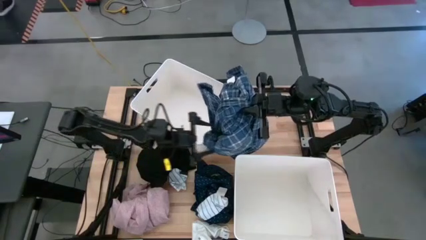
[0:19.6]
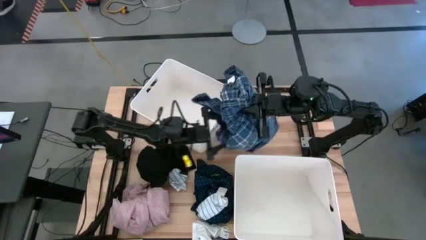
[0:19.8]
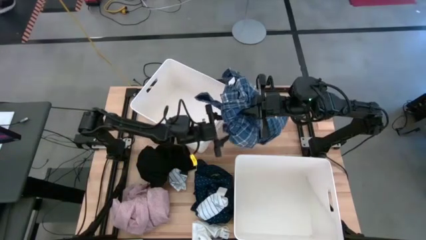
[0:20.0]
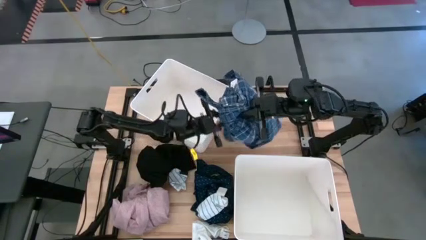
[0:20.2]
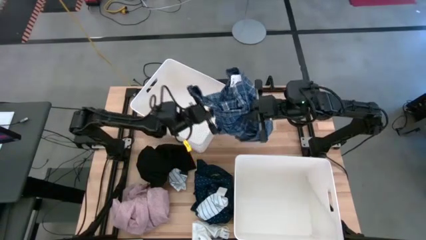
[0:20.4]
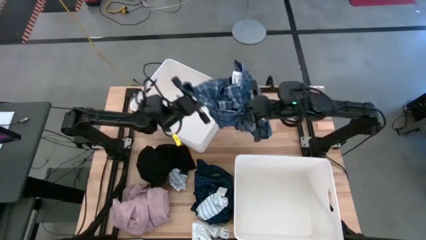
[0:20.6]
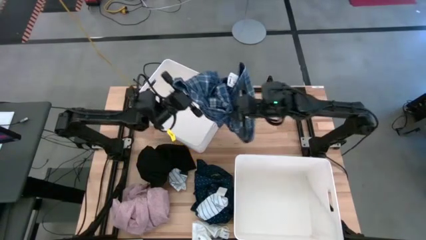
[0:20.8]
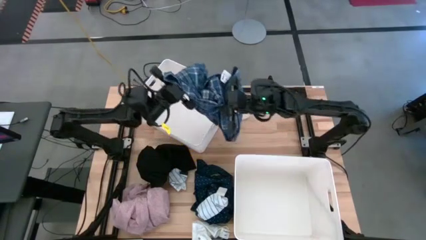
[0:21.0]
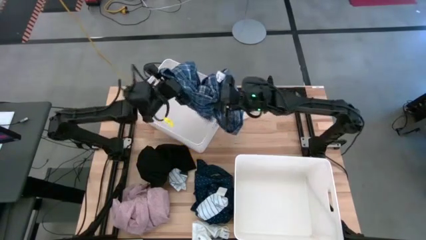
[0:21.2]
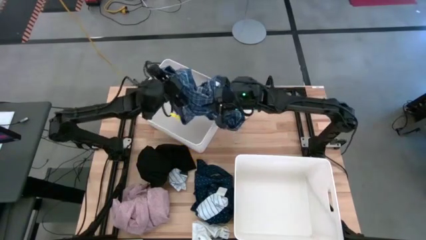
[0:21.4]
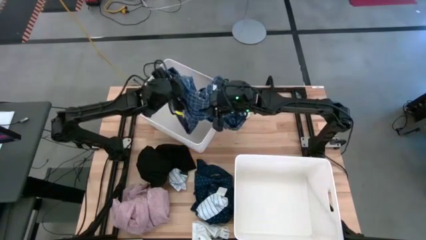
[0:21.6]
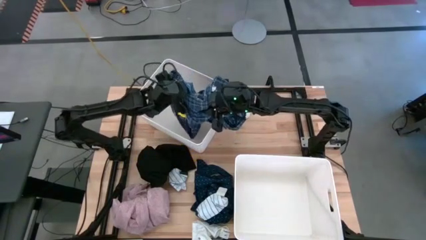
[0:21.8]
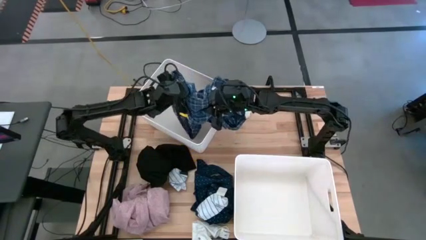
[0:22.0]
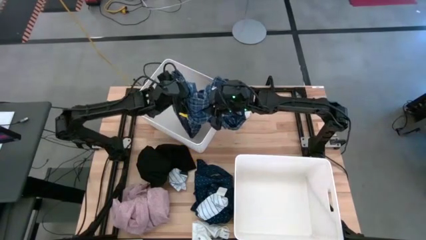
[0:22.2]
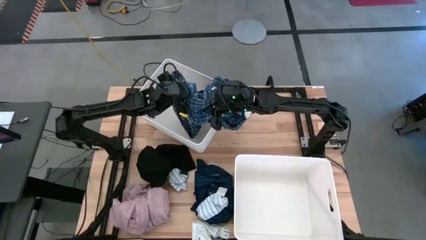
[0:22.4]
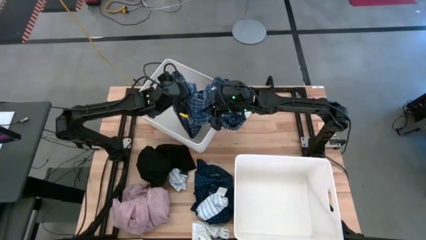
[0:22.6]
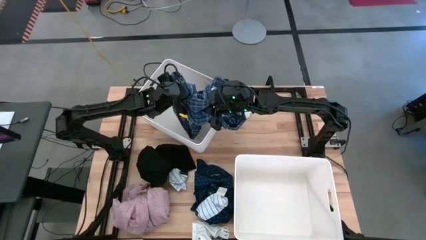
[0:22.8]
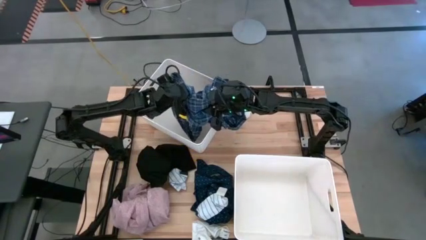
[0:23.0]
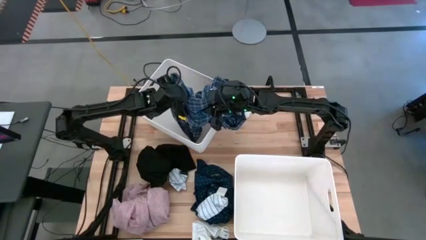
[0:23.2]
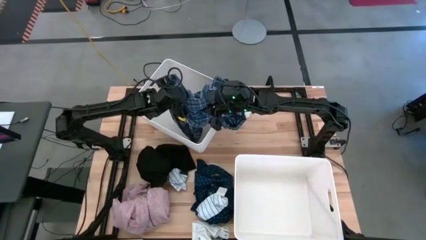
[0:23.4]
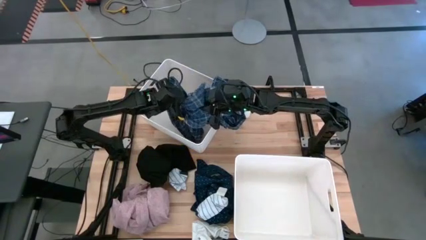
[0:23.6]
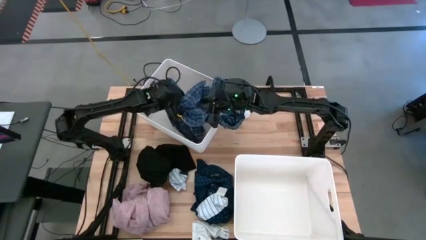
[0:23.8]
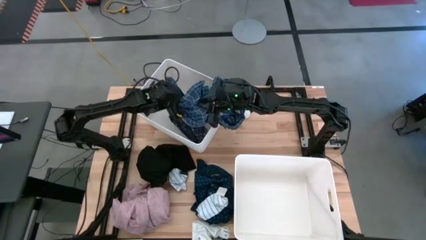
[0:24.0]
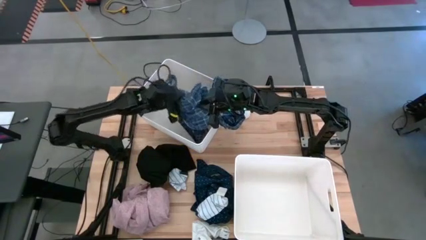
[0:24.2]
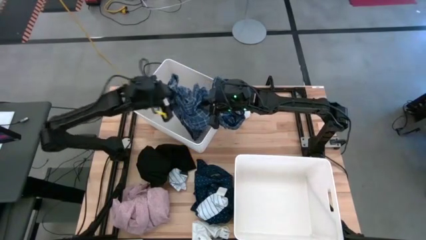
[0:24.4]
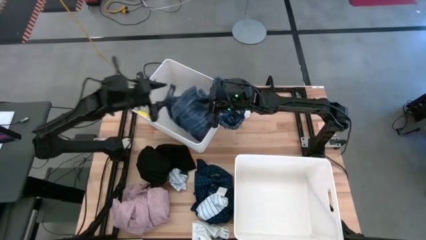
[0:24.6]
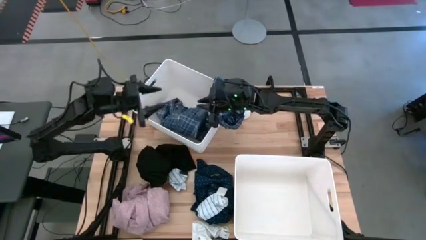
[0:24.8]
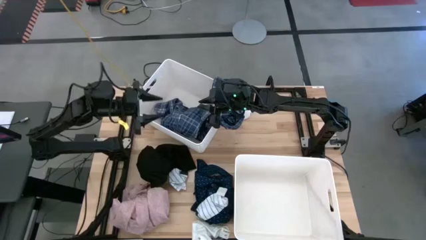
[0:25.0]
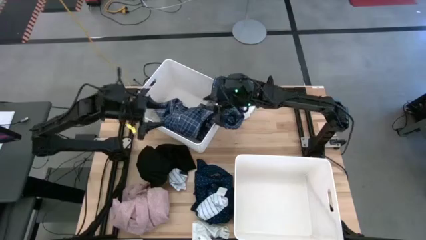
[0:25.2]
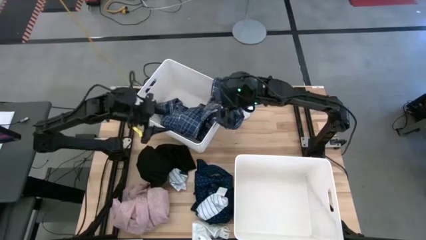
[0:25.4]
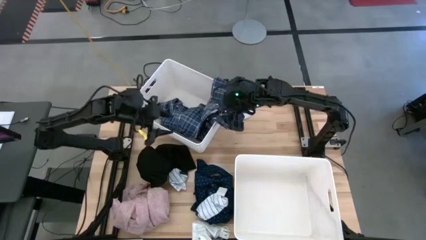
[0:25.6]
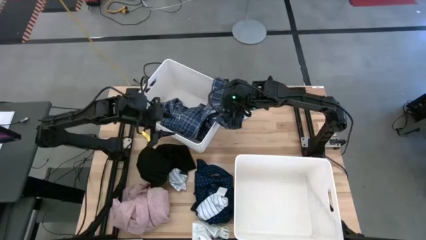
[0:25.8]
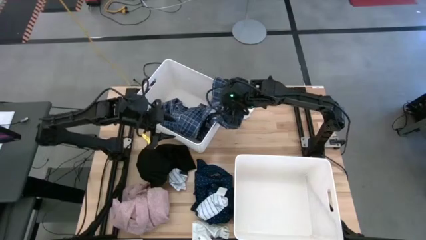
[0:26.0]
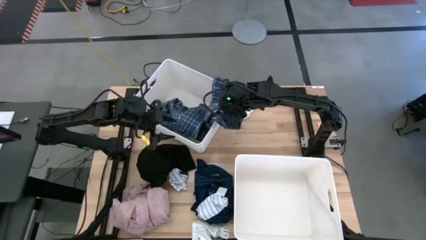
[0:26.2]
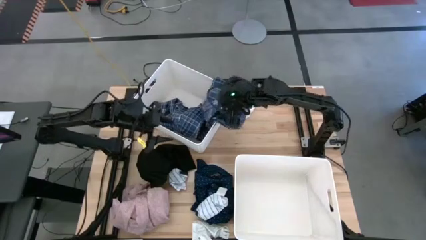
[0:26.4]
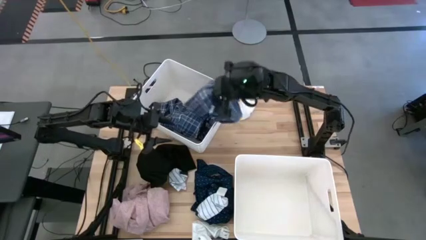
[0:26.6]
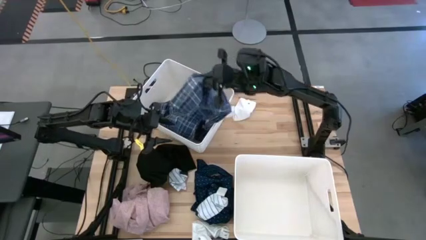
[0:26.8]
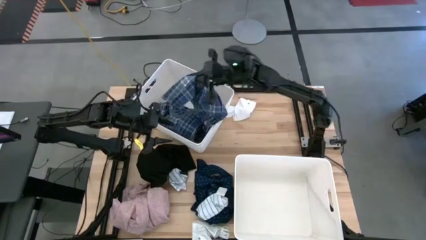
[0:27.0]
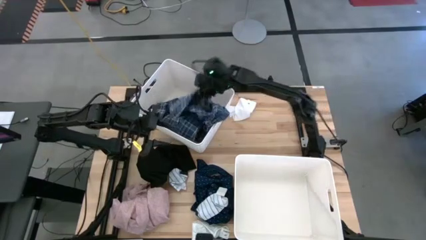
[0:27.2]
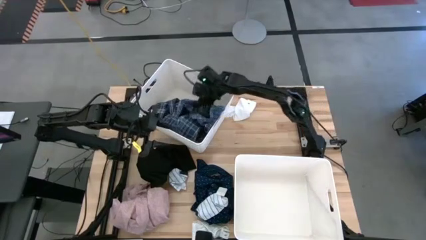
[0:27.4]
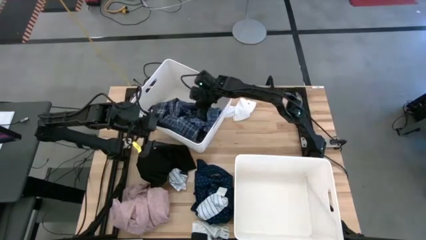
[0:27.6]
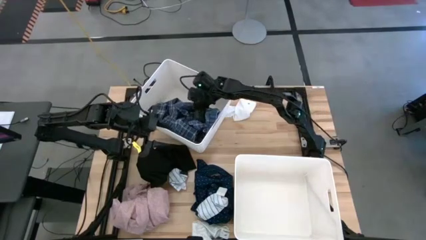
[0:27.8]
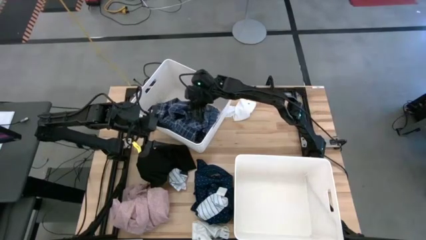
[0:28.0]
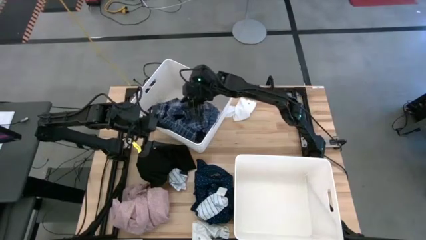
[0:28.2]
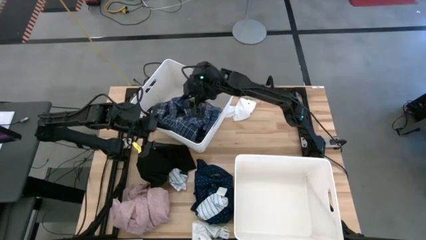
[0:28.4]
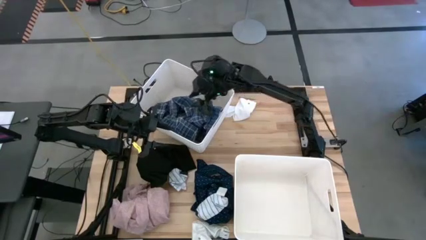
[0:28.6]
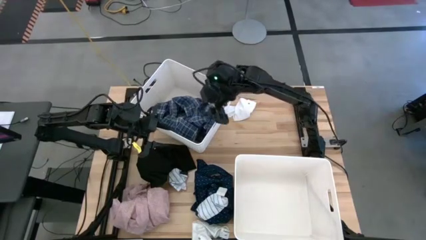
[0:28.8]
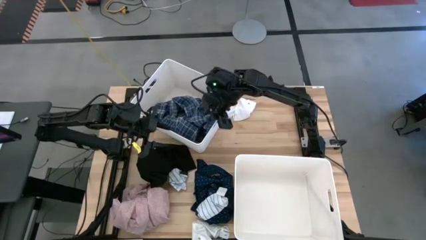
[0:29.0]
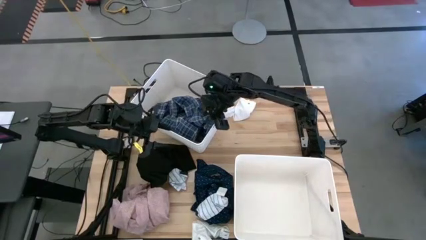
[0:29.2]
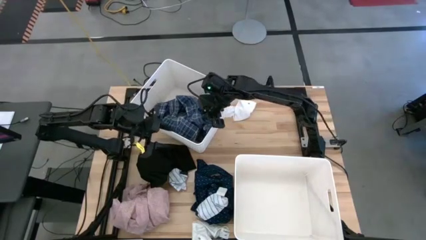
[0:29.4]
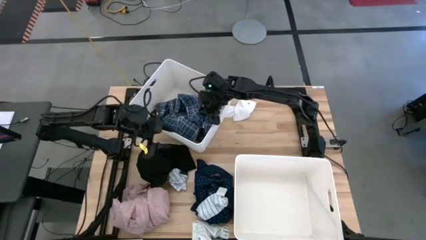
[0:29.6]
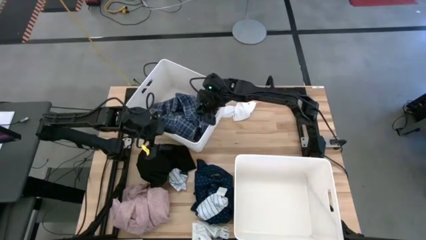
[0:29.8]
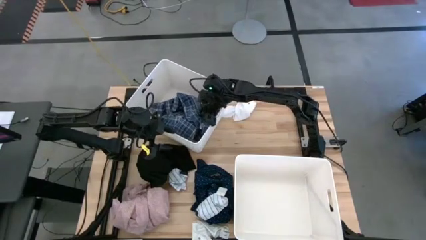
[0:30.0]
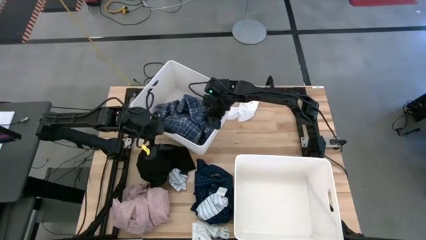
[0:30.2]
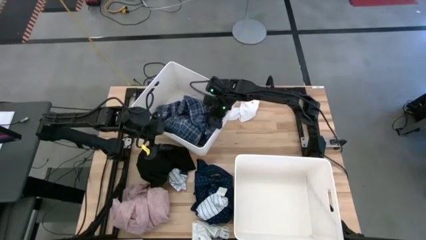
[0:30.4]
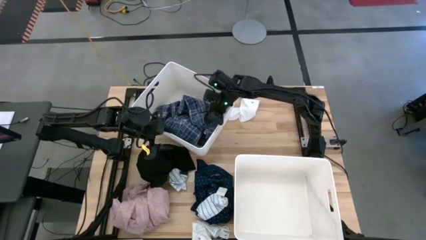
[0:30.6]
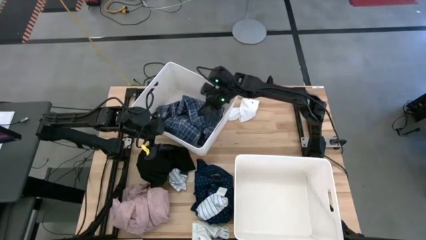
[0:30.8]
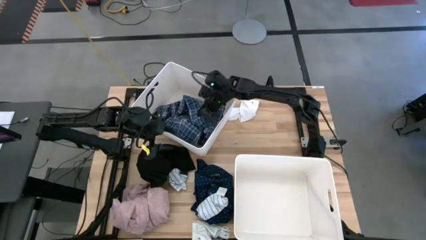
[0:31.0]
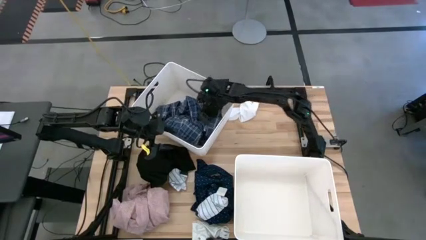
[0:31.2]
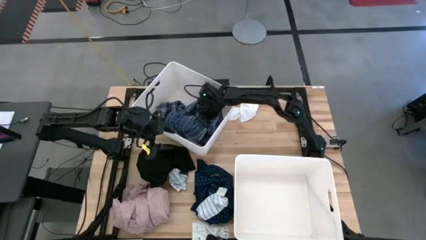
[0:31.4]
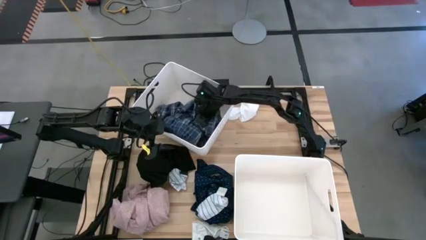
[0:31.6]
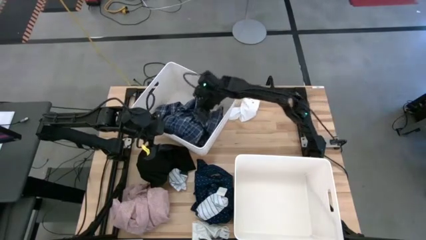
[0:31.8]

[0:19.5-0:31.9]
Task: Sort clothes
Put the top blue checkered polo shirt into the top white laundry bin

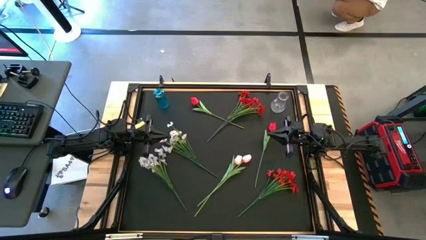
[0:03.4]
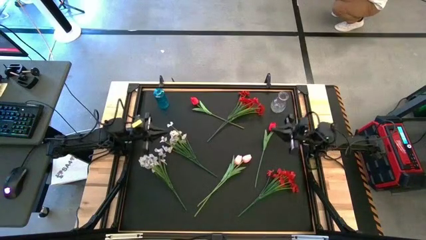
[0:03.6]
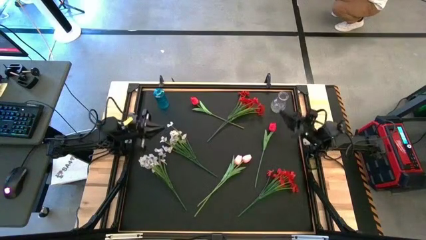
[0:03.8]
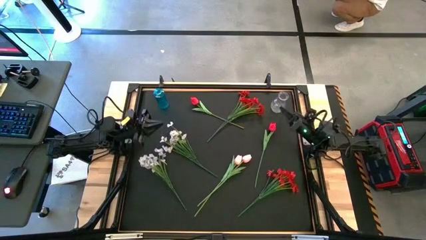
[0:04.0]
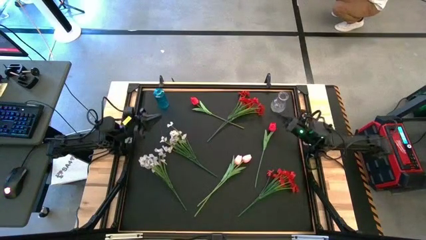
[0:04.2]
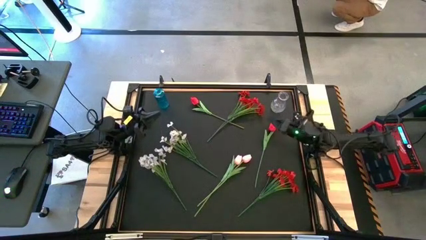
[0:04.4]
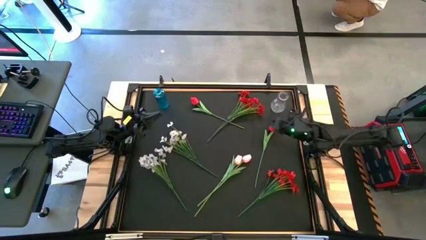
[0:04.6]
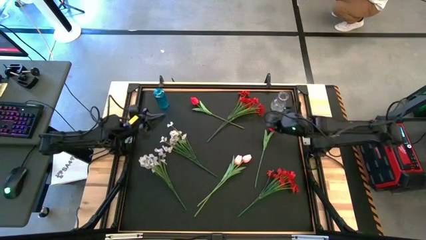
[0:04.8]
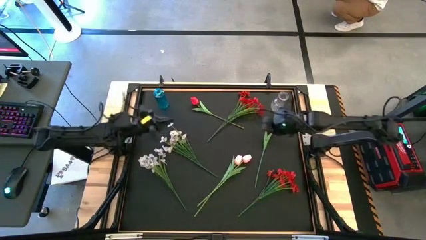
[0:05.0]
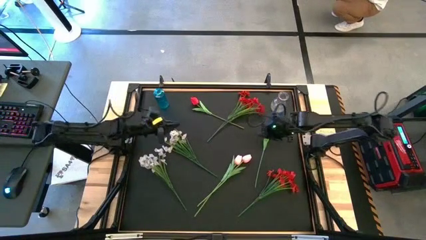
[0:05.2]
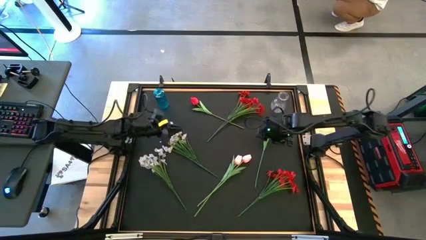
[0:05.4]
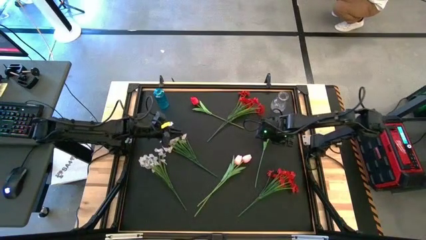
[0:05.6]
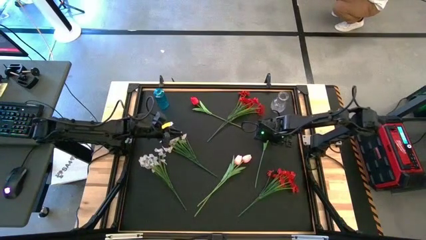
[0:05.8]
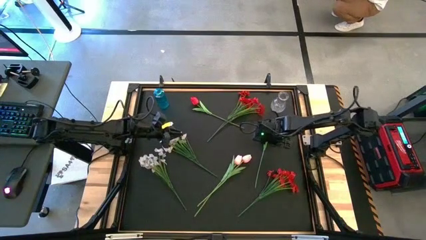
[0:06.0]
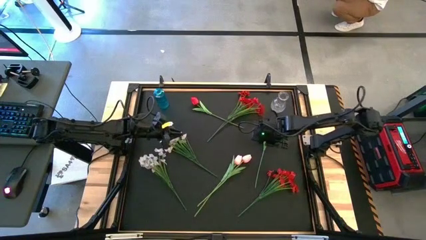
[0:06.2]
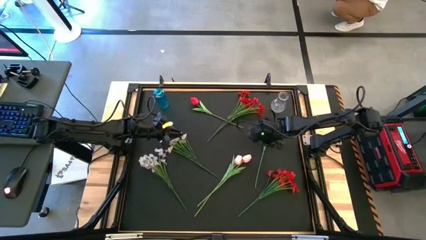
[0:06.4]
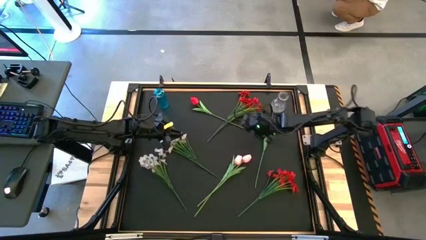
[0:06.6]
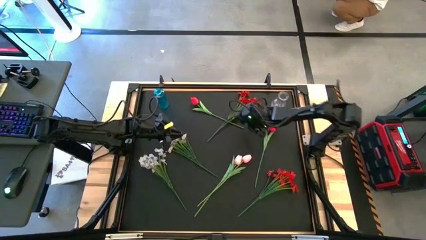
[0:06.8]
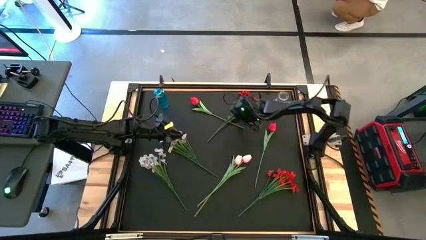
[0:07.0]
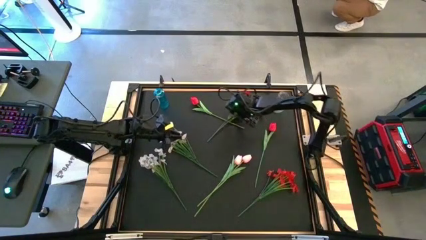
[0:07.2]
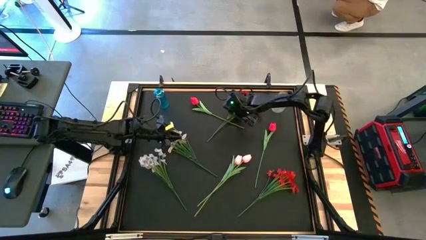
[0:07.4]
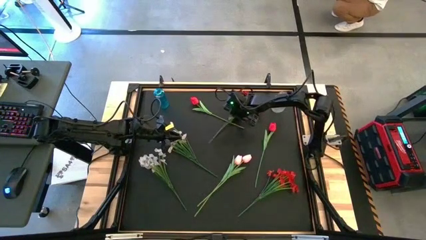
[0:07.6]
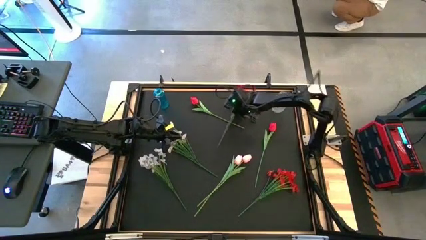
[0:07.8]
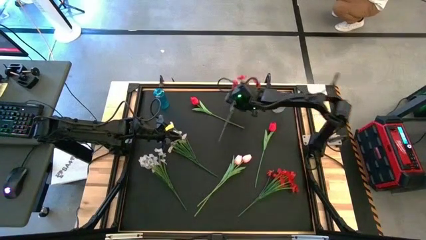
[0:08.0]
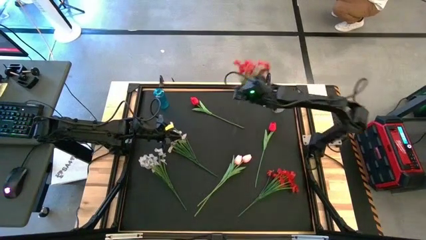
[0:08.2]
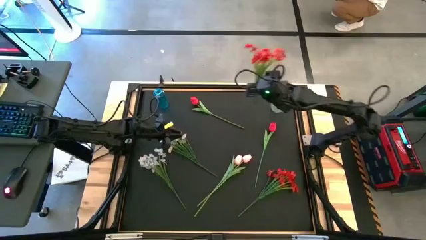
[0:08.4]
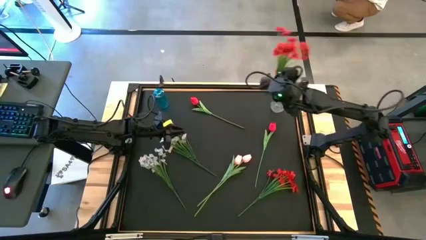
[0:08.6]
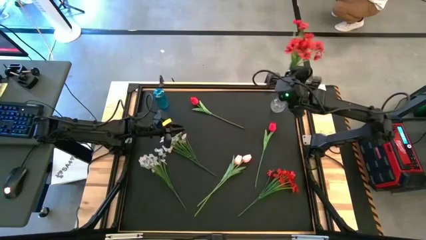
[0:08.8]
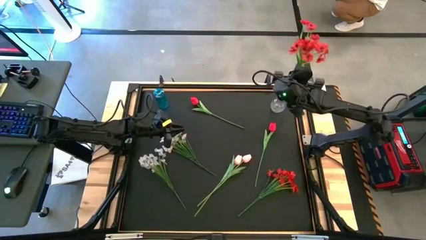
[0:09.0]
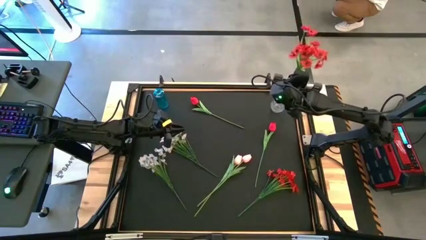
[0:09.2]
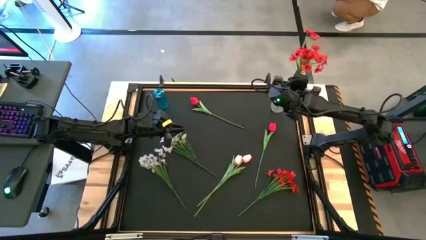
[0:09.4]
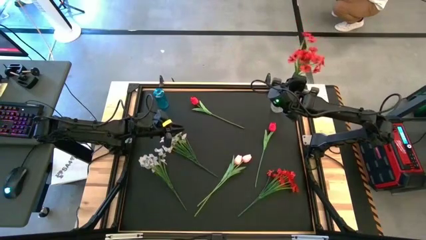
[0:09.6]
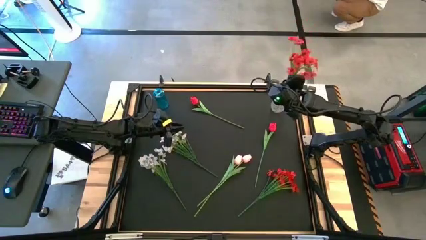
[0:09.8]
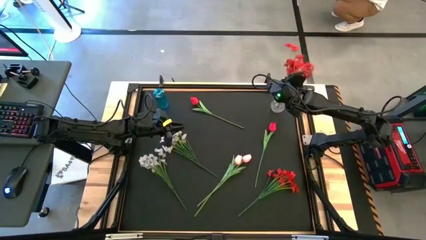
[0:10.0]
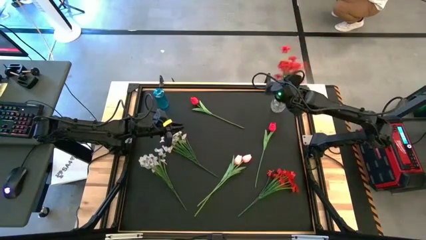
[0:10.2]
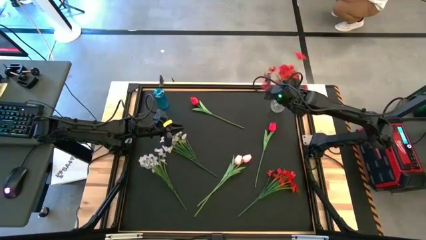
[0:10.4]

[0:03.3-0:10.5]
Task: Sort flowers into vase by color
Put the top red flowers into the transparent vase
